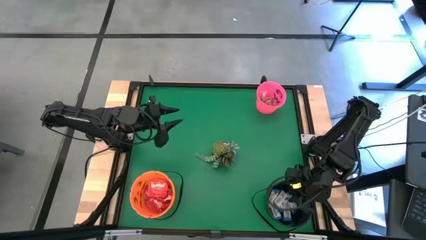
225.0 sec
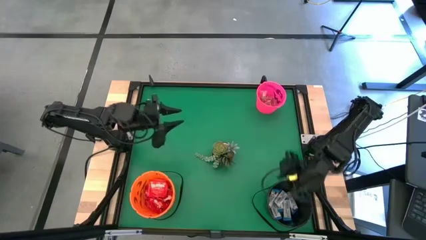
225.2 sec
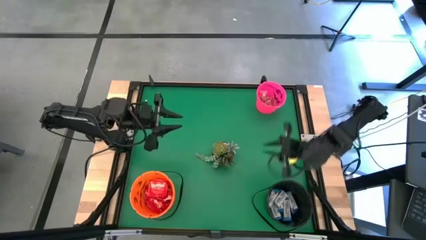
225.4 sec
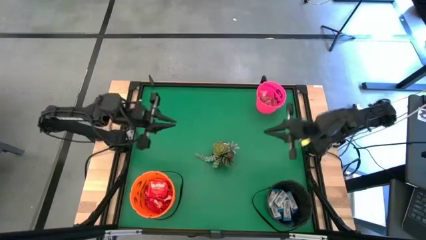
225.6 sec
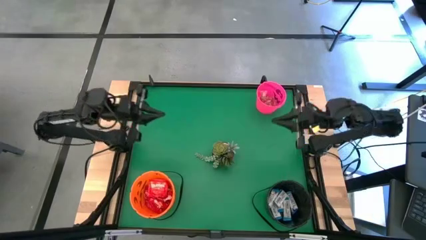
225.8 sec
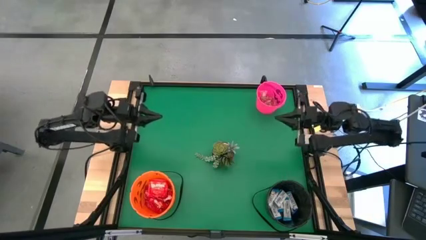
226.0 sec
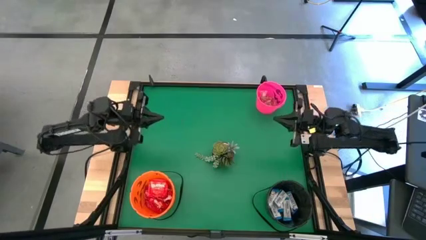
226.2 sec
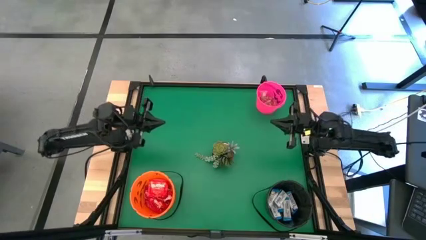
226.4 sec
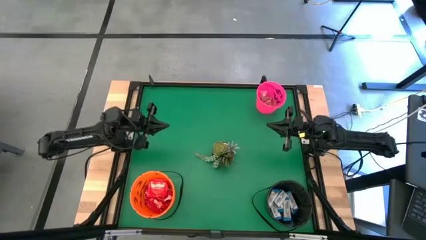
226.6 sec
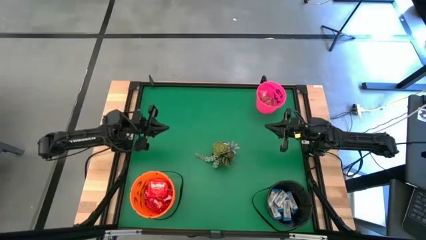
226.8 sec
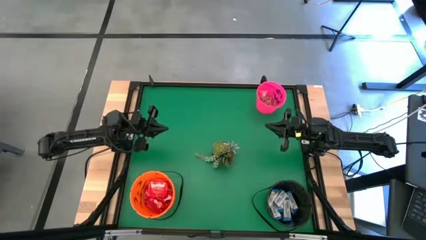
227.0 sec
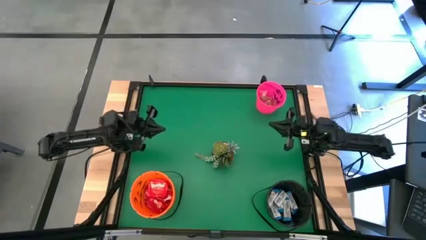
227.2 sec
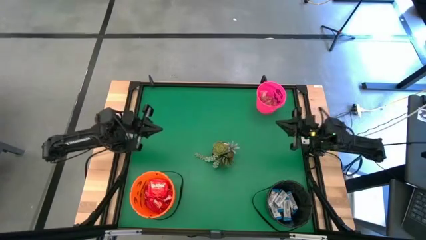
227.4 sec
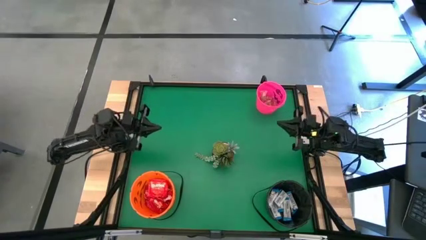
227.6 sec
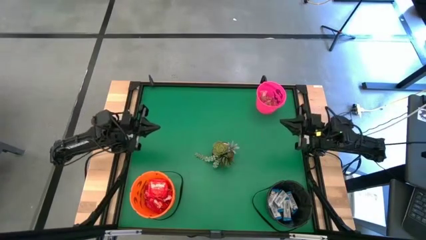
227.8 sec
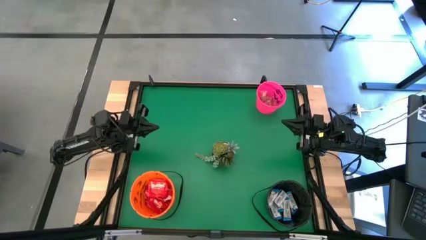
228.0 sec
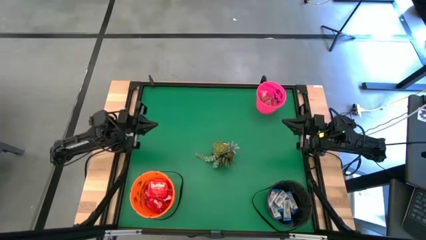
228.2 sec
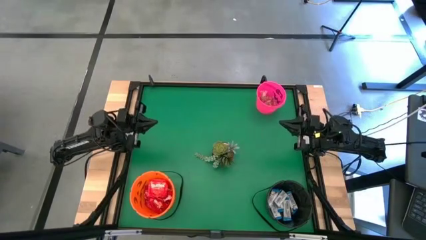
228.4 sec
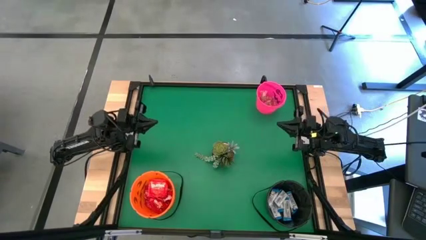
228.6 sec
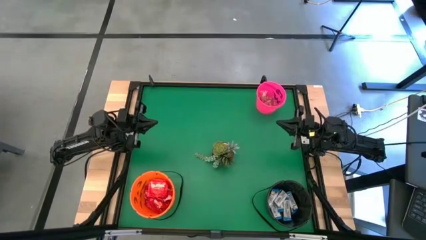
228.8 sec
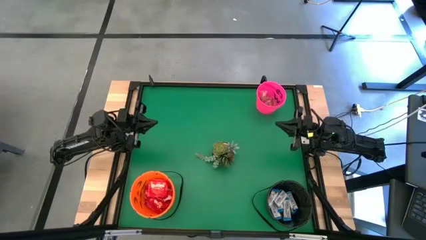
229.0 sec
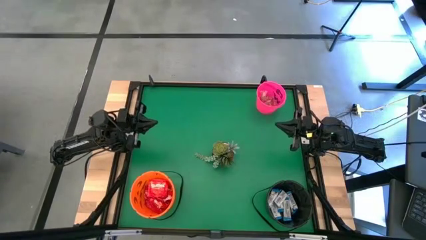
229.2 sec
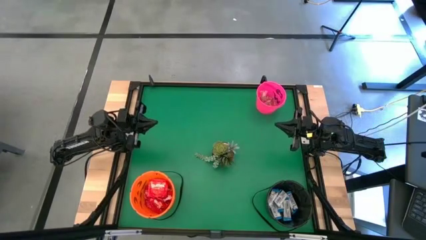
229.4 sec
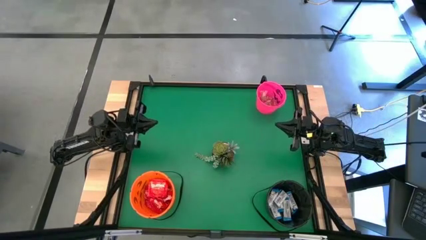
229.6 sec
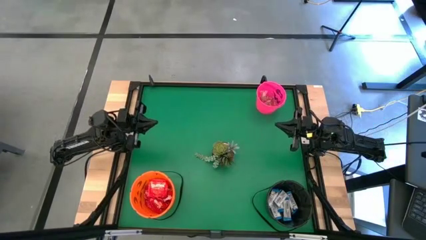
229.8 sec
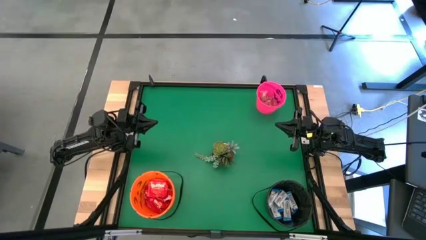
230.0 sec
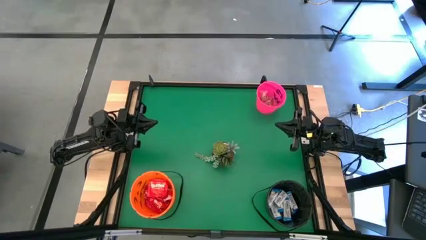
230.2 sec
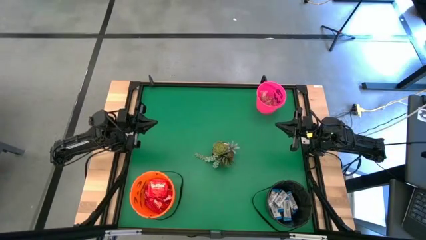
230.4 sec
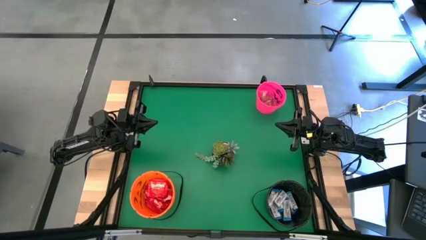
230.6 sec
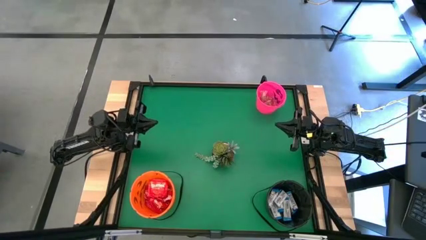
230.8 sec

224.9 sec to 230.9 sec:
Task: Sort candy
Return to Home Position

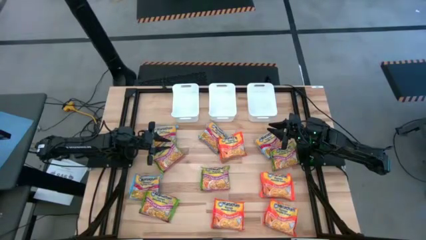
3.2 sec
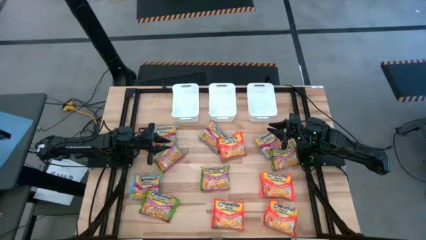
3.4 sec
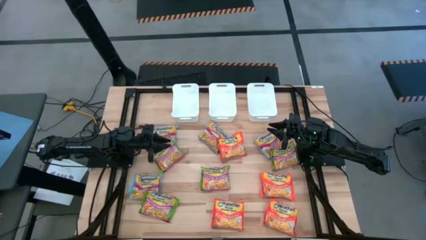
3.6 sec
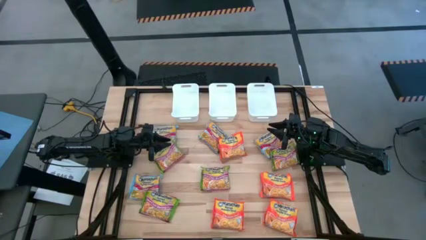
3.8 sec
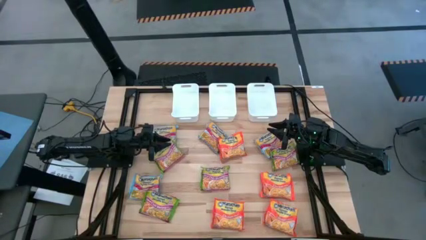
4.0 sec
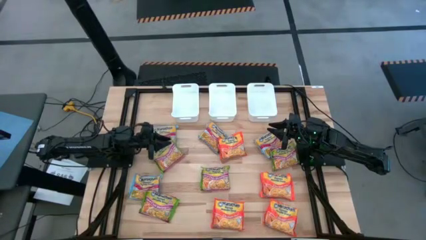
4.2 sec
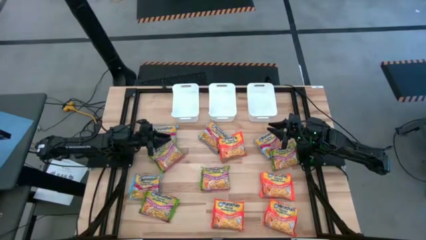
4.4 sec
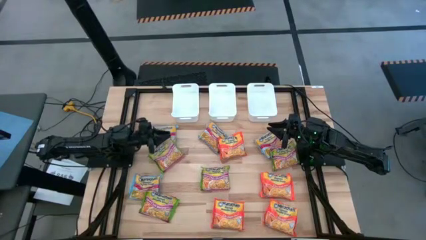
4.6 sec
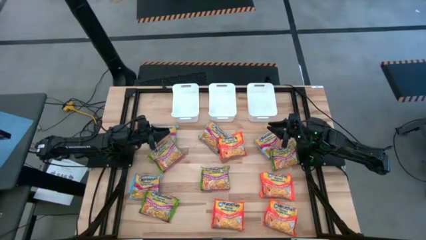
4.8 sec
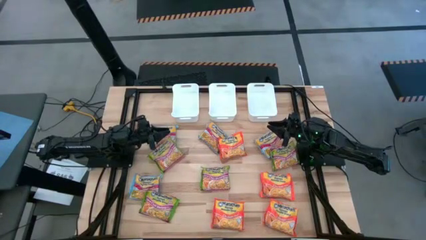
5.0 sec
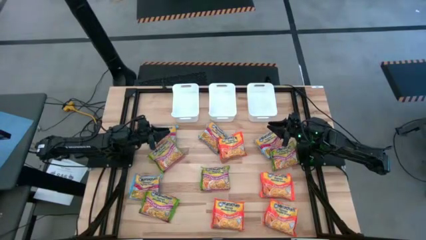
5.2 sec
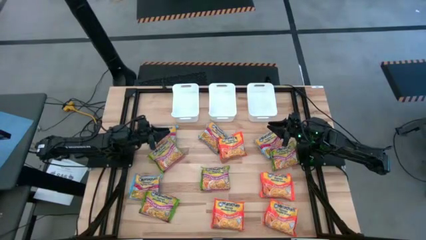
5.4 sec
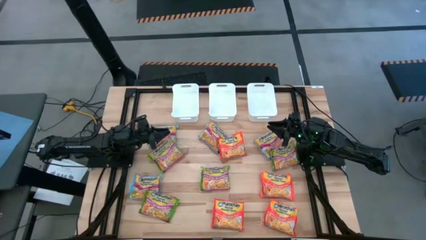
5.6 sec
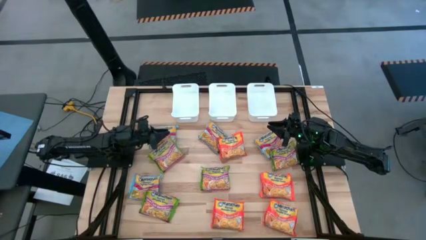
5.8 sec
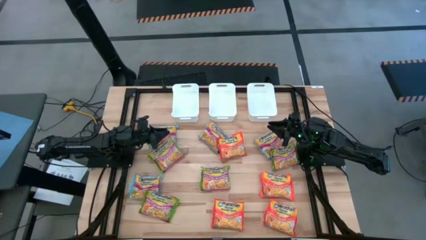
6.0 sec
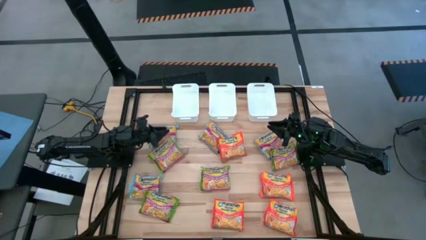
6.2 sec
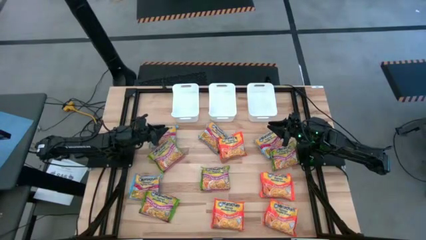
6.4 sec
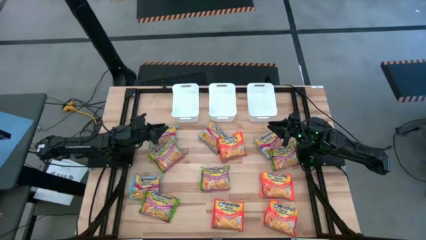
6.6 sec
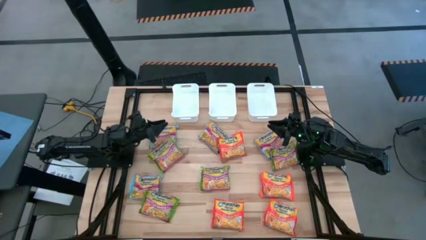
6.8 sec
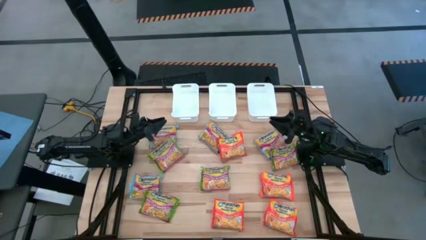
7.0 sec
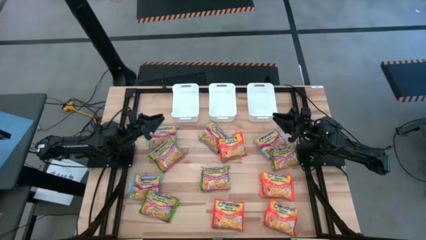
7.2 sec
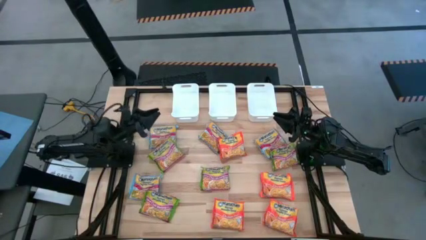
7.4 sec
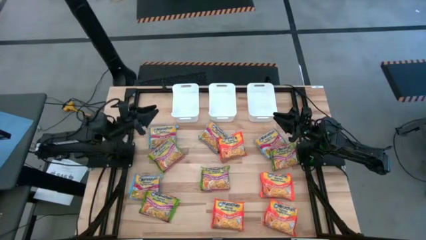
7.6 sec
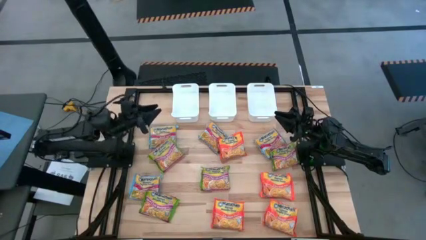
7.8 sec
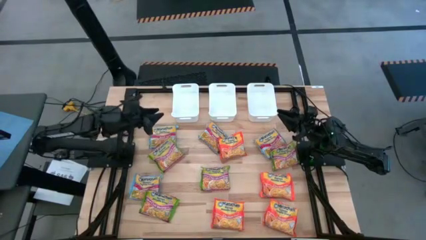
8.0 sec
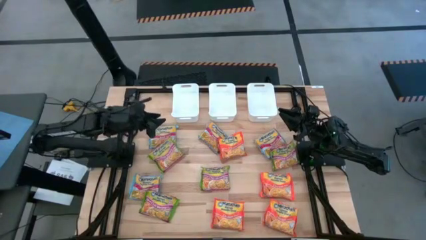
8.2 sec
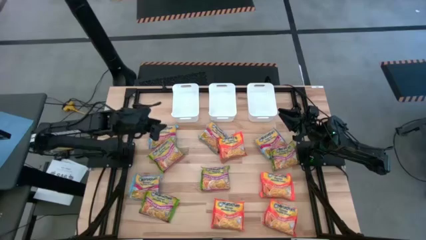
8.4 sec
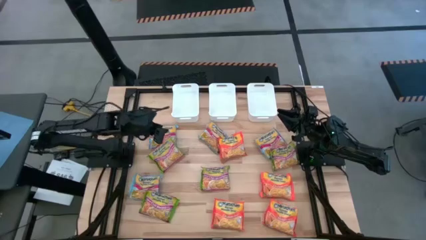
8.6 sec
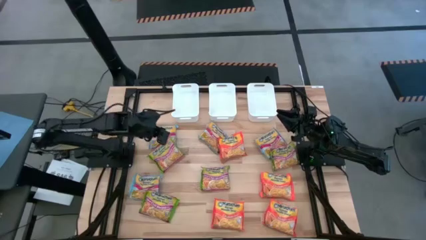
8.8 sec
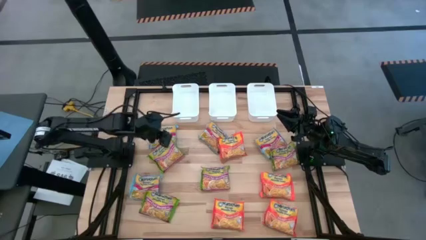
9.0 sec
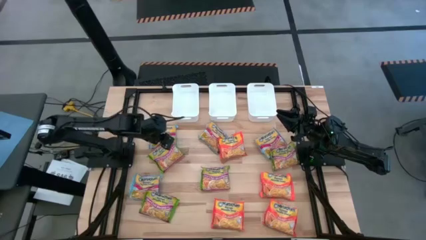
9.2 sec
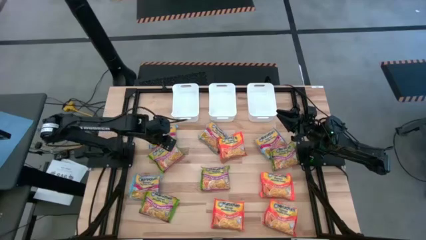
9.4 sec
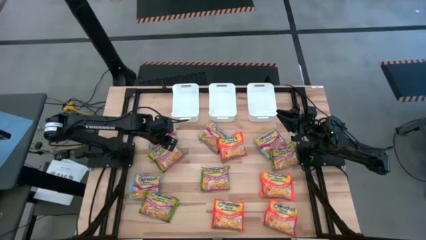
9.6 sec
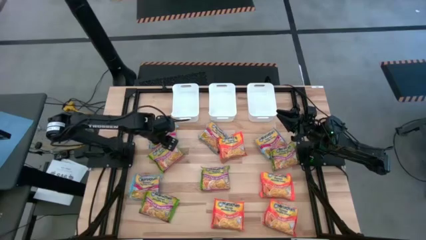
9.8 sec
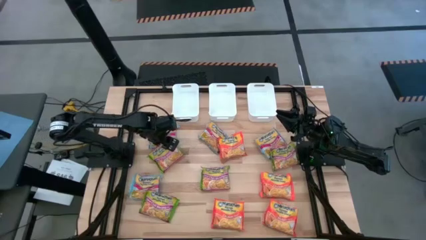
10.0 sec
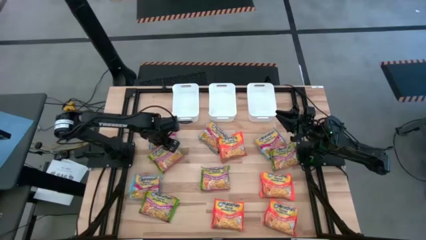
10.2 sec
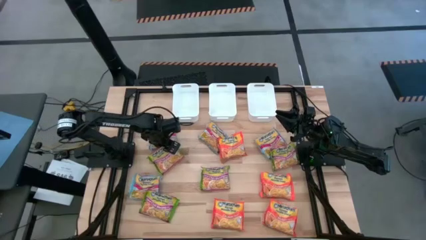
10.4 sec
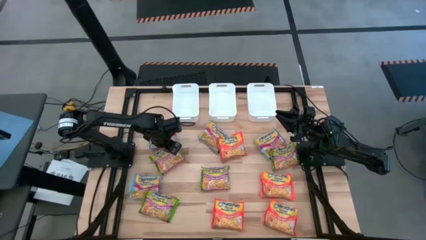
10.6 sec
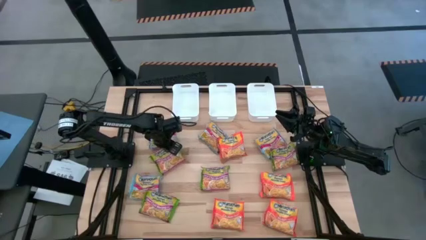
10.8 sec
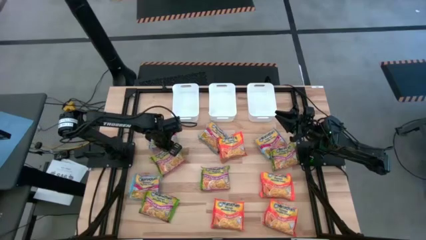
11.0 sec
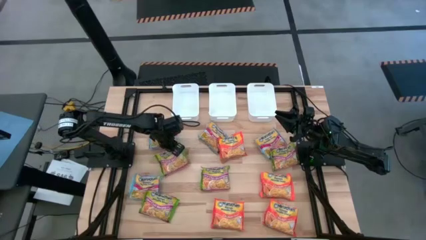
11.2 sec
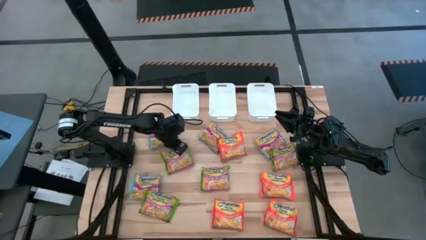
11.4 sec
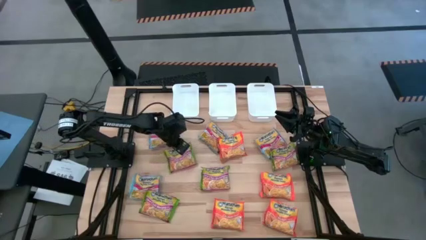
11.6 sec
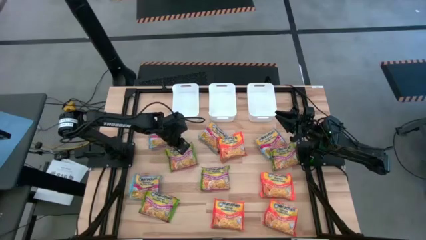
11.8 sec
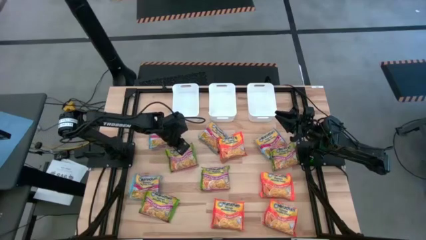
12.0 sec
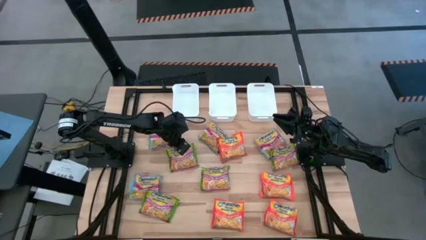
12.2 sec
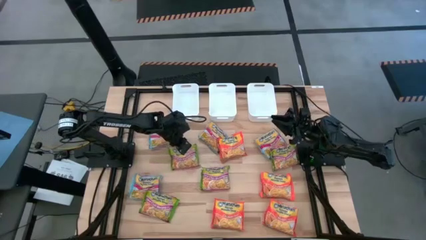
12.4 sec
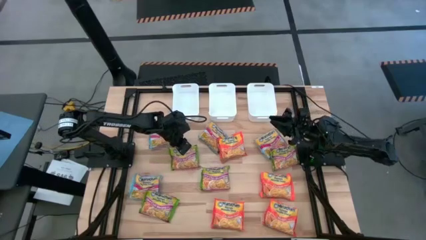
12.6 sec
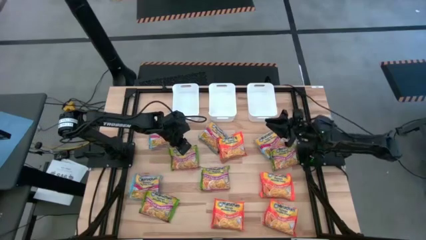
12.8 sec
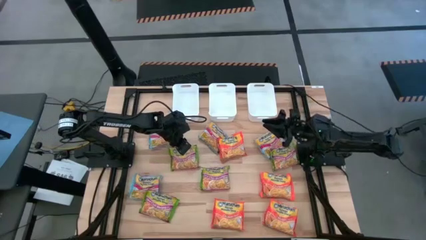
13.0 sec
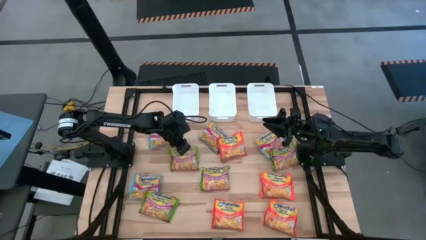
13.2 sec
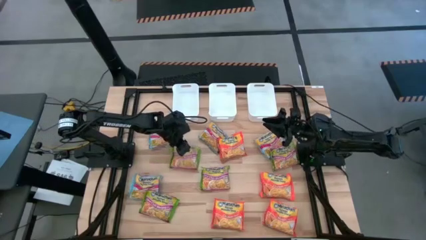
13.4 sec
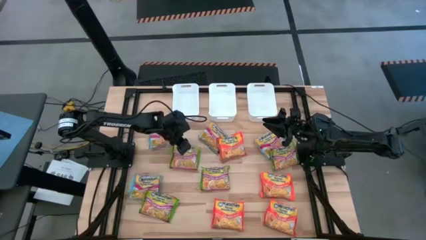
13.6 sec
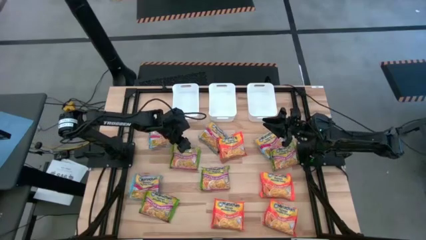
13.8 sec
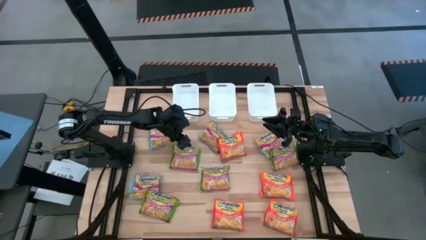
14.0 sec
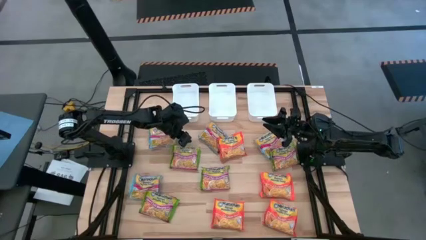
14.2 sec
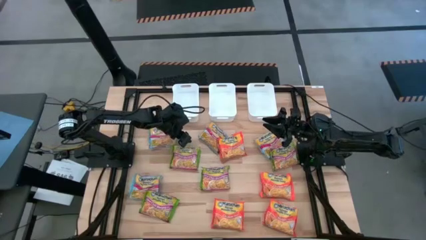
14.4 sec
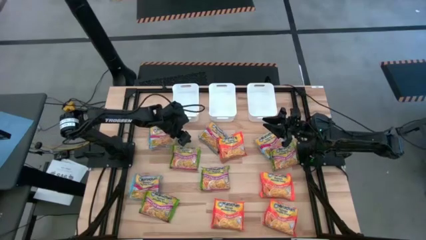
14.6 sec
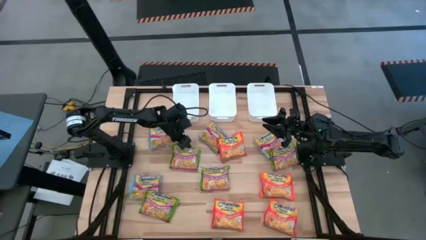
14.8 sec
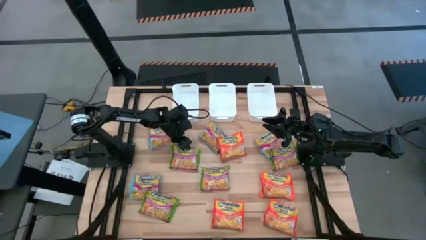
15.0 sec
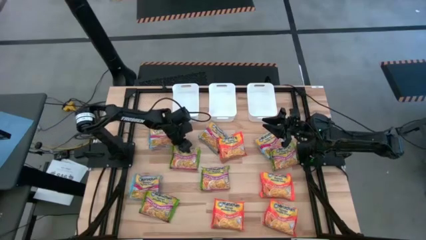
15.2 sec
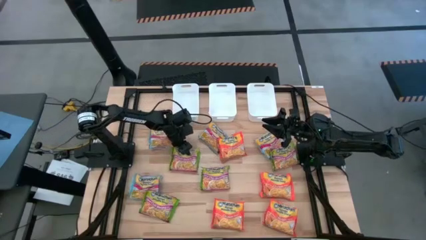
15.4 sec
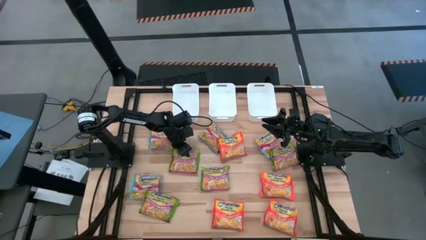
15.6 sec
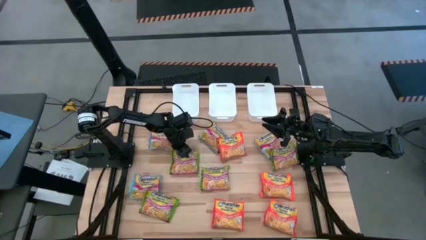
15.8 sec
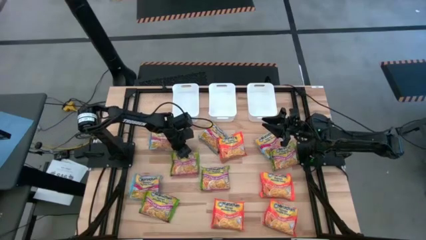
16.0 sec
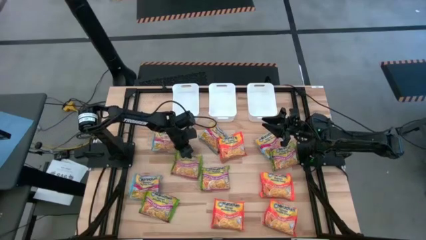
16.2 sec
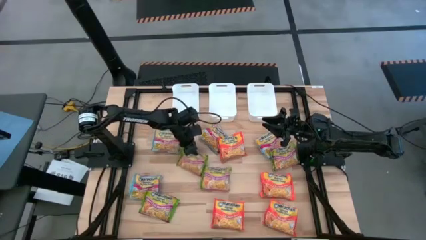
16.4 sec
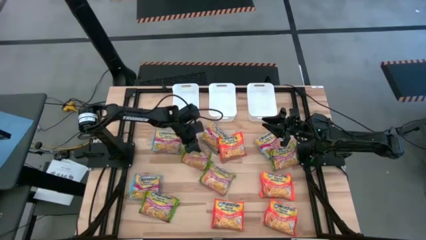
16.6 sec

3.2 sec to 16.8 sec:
Task: Sort Maruchan noodles
Put the green noodle pack into the right white bin
